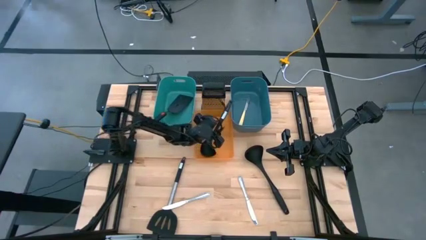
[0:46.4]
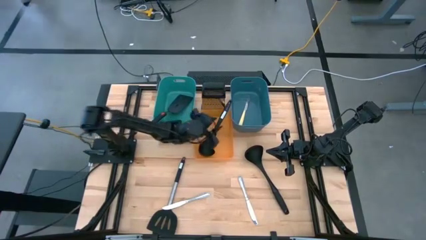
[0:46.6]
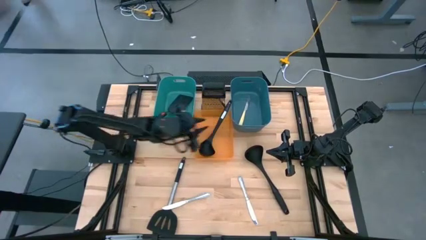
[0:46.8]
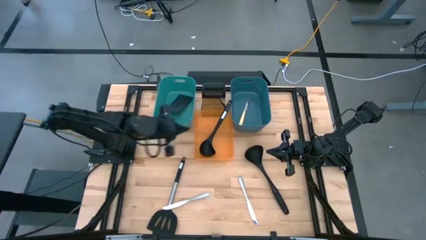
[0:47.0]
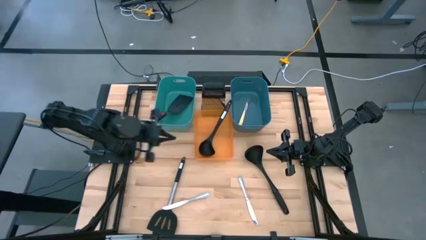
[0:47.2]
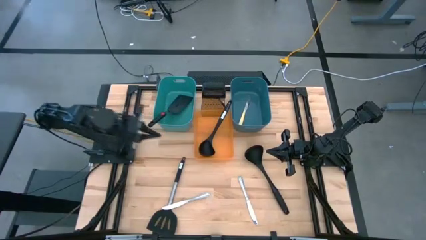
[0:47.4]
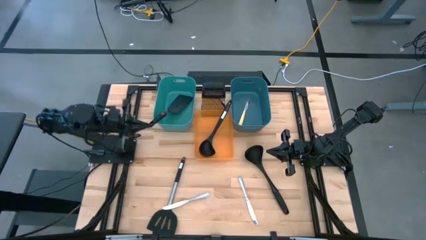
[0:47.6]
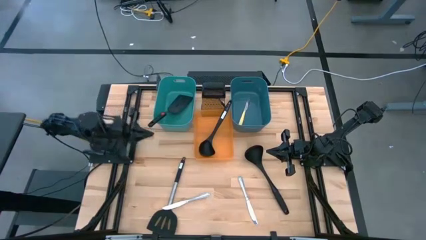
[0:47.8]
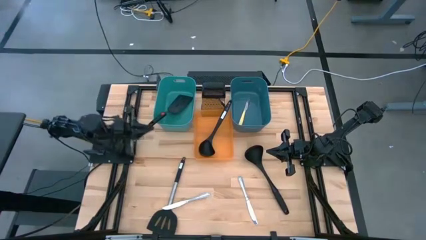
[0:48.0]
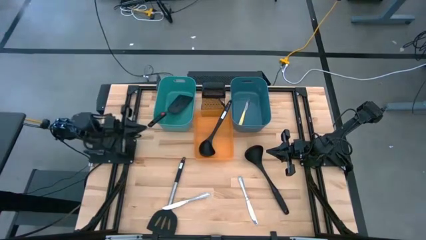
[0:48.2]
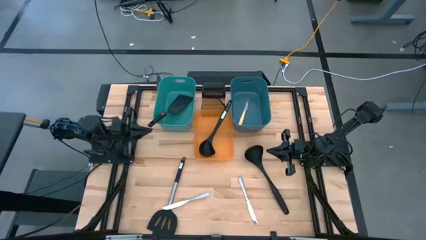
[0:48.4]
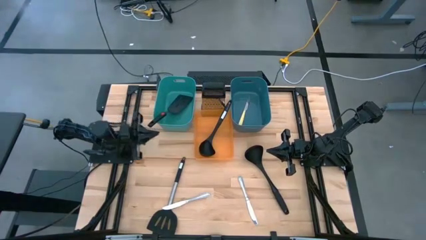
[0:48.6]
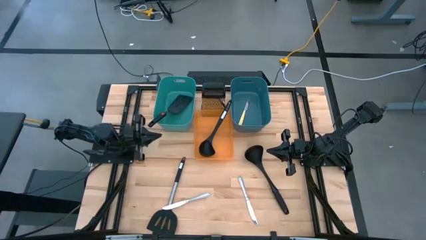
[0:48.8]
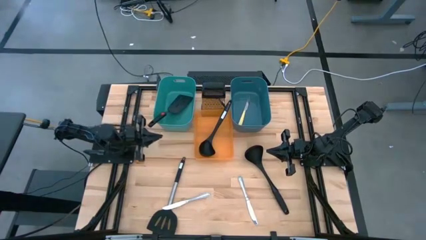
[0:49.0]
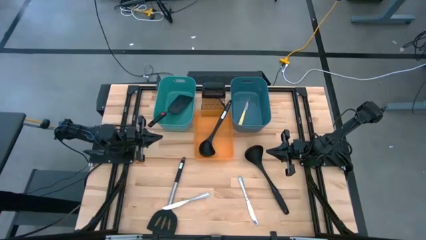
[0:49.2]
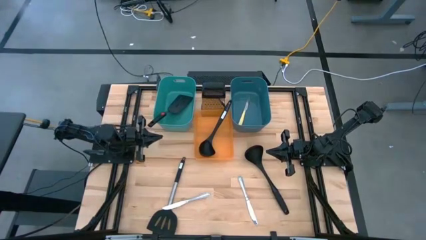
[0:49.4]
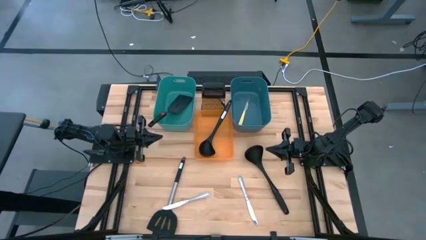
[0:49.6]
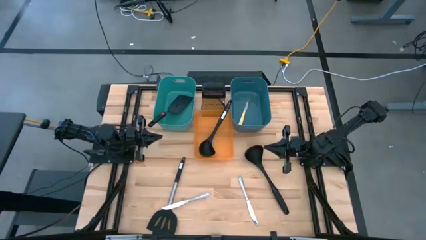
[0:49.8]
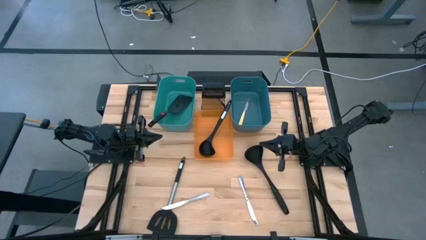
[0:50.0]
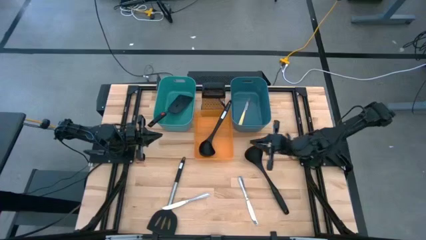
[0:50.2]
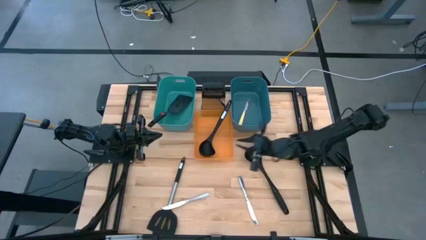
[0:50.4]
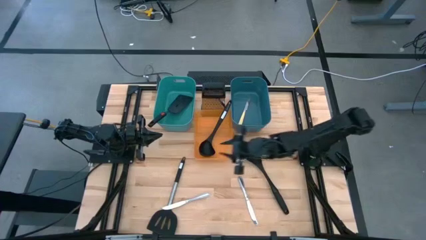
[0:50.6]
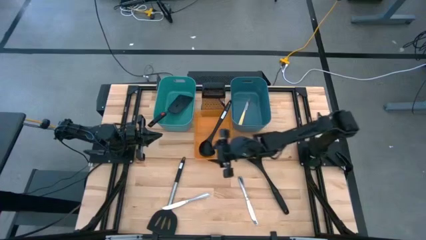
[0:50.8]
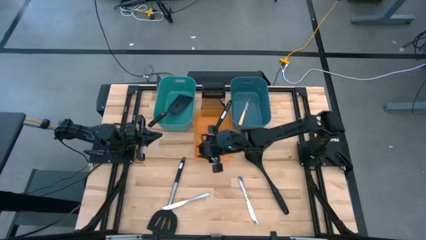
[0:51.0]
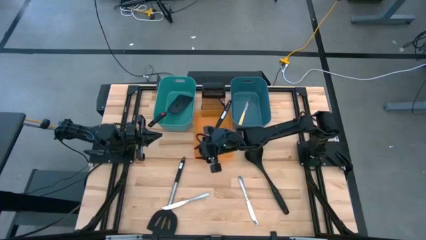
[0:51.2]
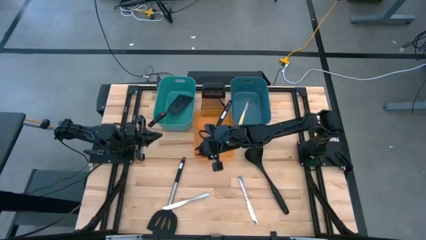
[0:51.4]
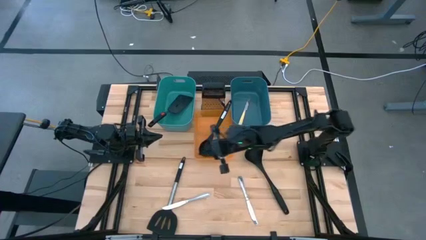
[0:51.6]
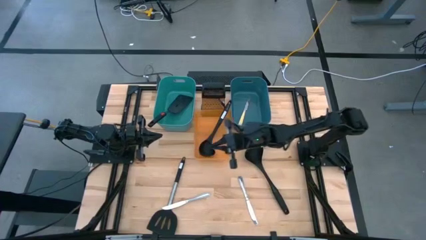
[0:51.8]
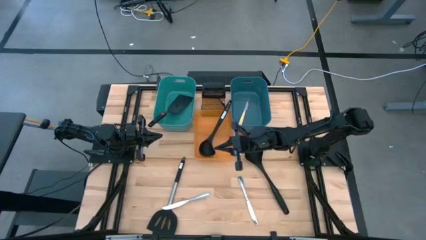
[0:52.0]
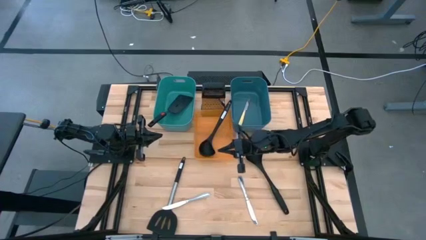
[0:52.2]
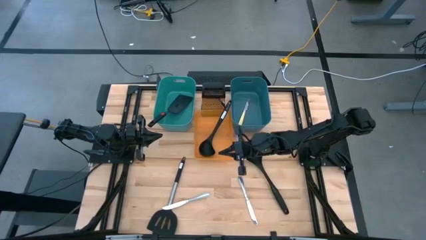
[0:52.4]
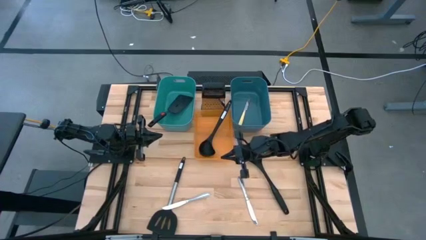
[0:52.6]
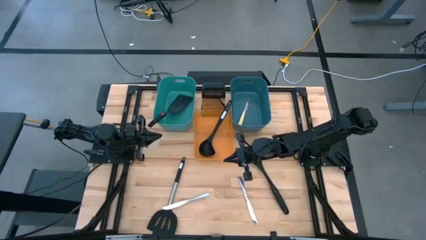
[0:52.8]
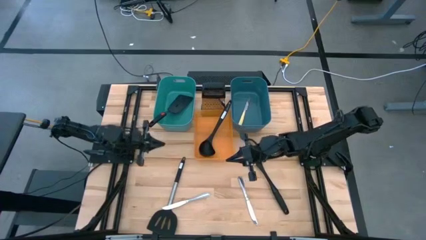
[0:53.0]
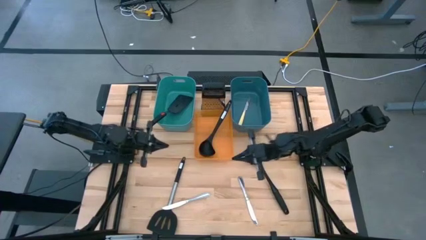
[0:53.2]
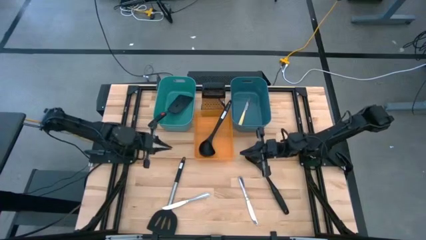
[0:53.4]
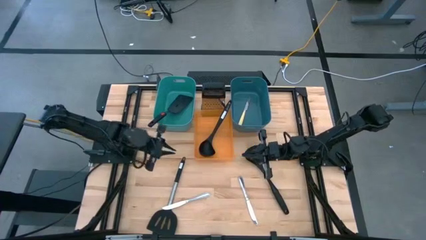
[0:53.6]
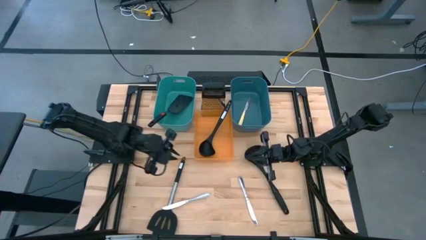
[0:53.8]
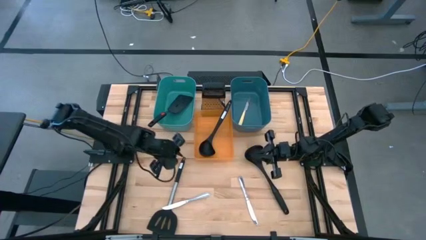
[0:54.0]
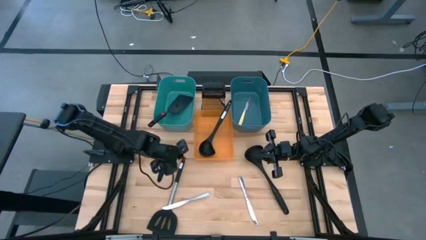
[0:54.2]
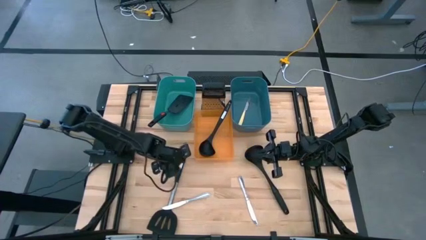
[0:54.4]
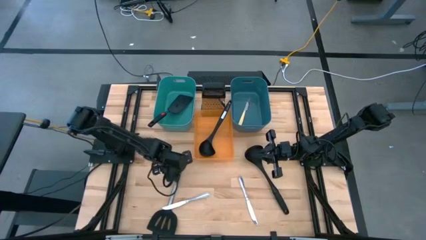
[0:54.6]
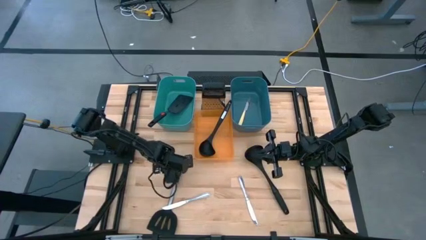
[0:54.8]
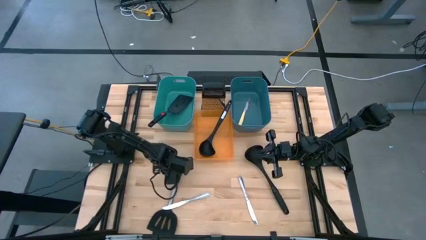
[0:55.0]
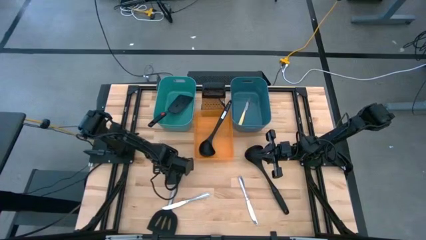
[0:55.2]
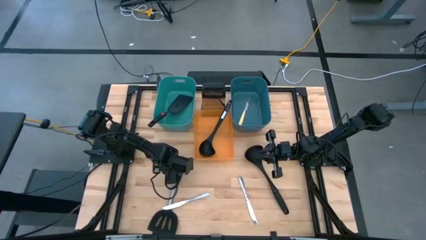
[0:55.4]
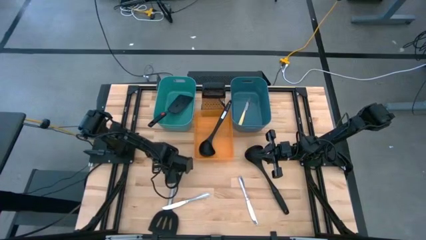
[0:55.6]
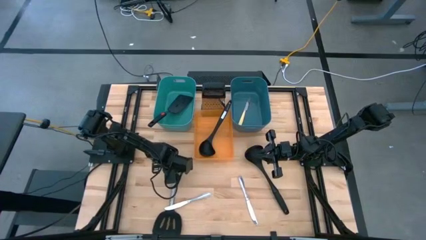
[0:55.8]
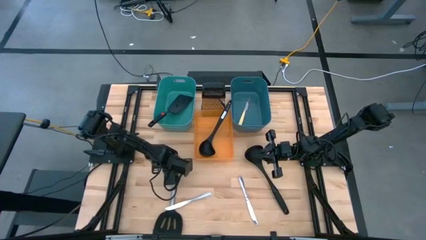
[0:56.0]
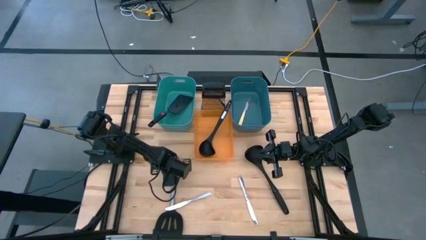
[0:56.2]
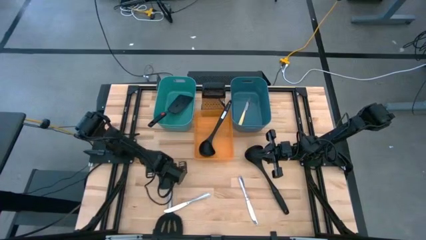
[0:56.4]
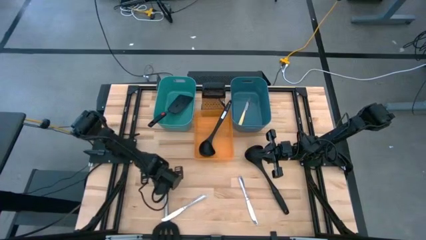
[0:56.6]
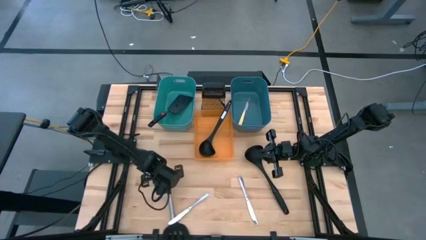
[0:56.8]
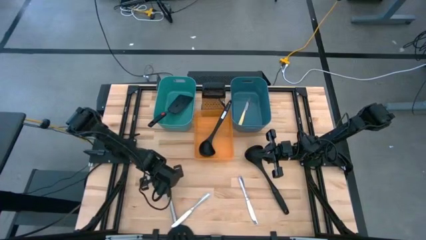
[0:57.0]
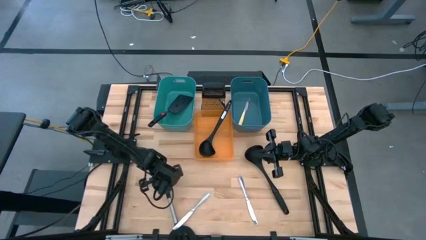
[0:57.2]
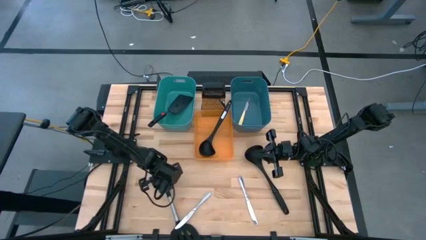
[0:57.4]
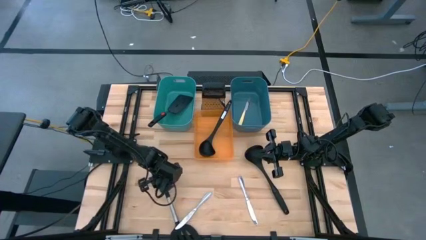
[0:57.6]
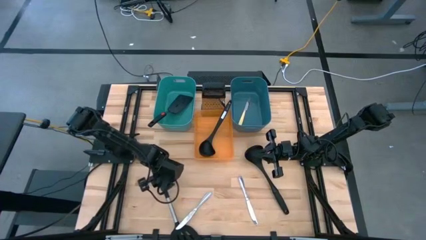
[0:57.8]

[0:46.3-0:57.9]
Task: Pick & Place Kitchen Items
Put the black spatula into the green bin

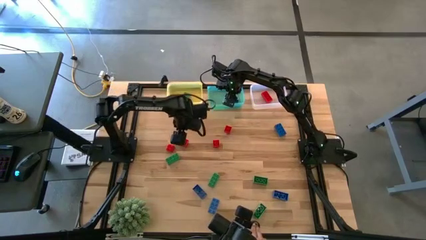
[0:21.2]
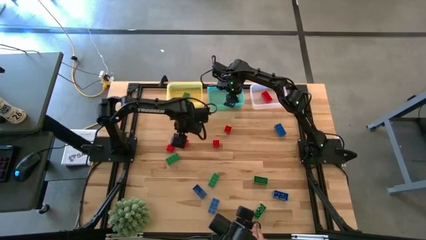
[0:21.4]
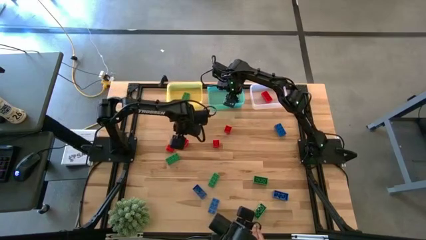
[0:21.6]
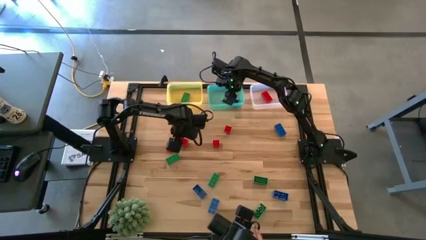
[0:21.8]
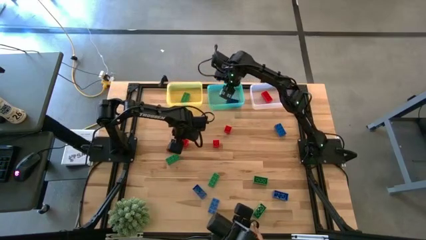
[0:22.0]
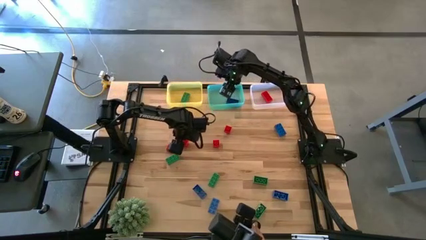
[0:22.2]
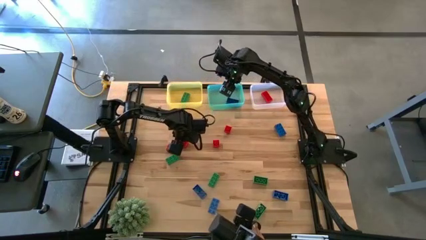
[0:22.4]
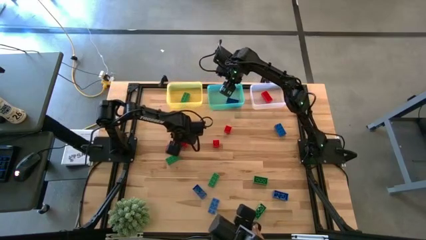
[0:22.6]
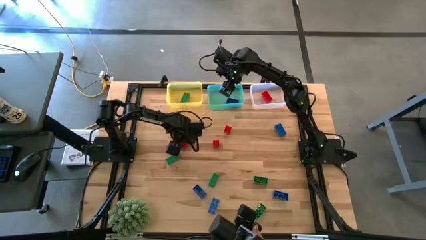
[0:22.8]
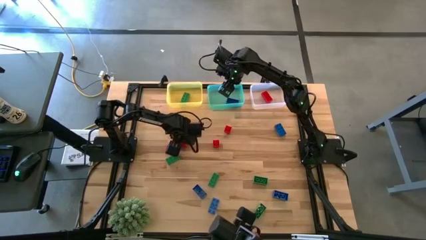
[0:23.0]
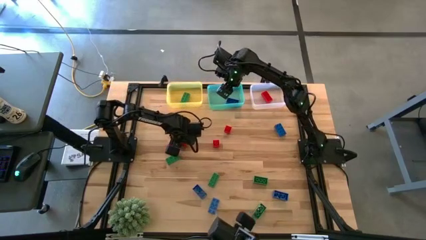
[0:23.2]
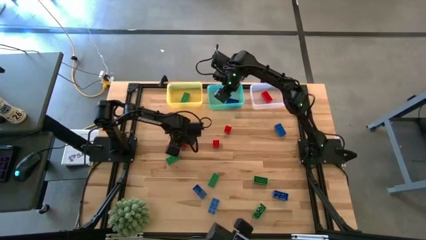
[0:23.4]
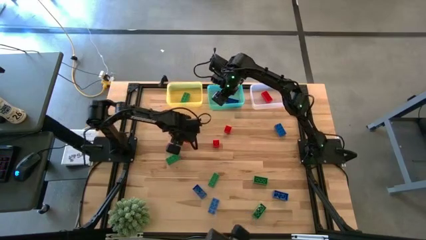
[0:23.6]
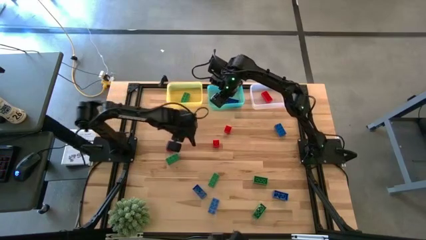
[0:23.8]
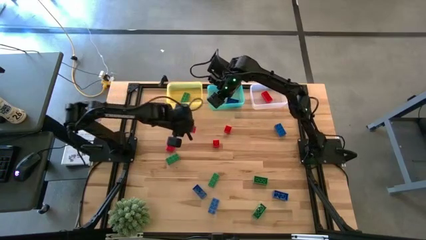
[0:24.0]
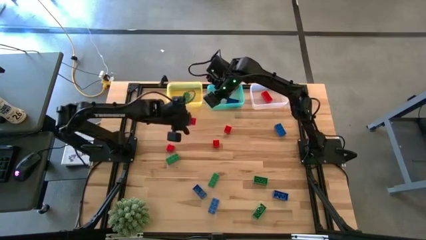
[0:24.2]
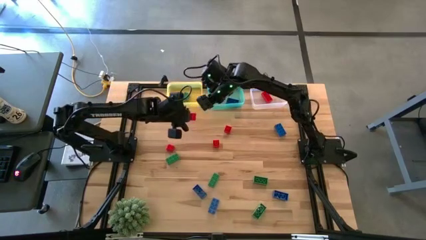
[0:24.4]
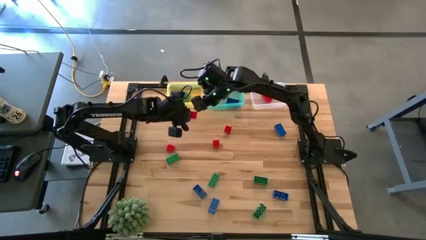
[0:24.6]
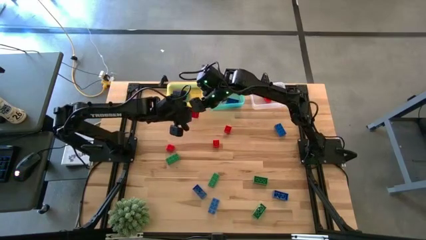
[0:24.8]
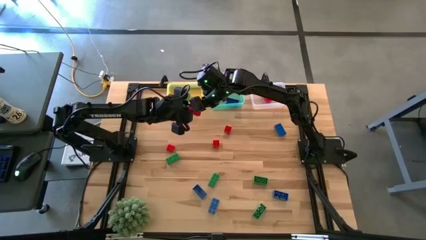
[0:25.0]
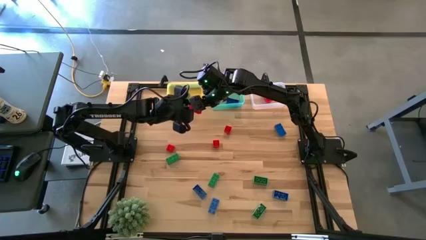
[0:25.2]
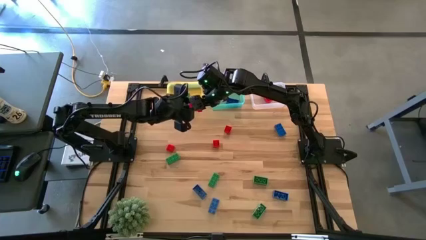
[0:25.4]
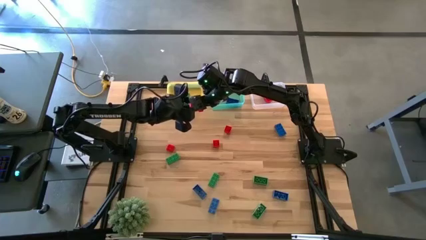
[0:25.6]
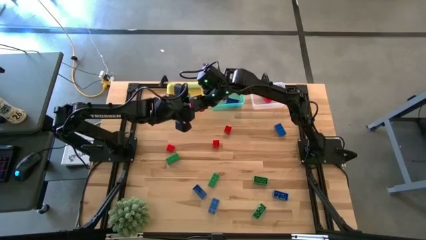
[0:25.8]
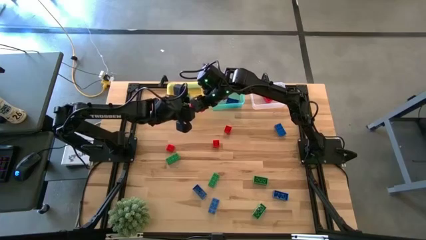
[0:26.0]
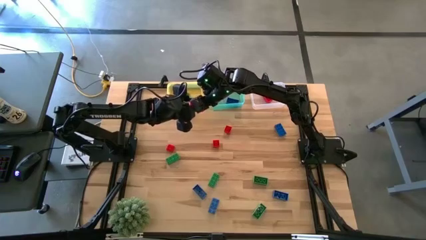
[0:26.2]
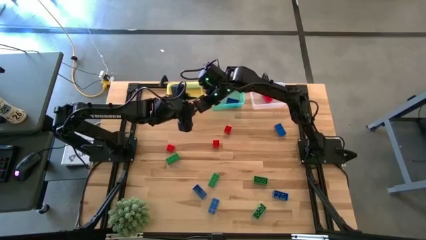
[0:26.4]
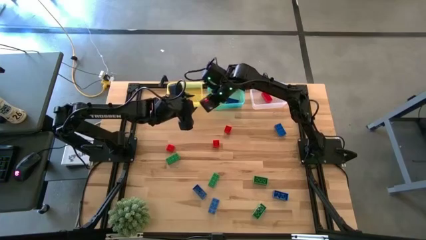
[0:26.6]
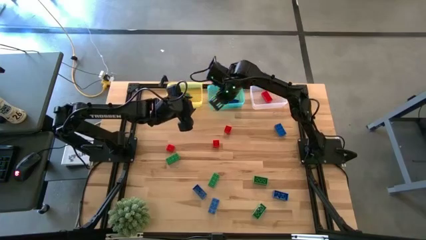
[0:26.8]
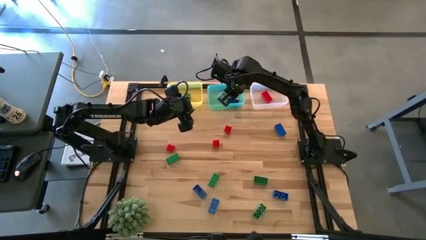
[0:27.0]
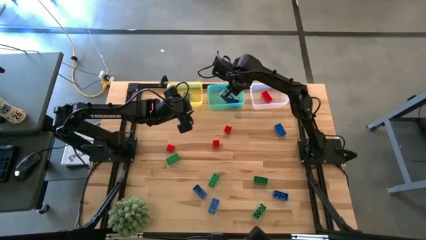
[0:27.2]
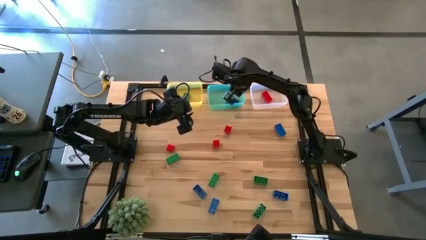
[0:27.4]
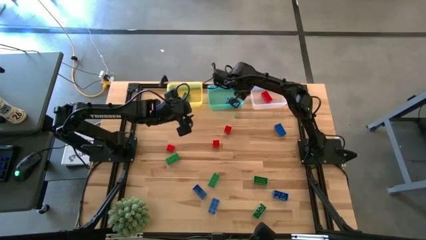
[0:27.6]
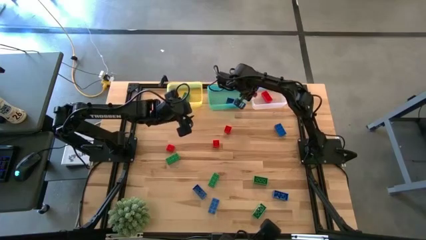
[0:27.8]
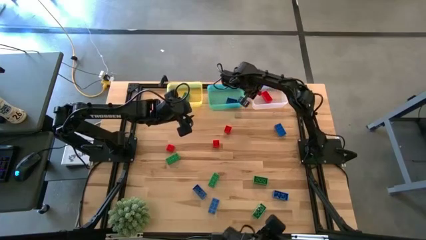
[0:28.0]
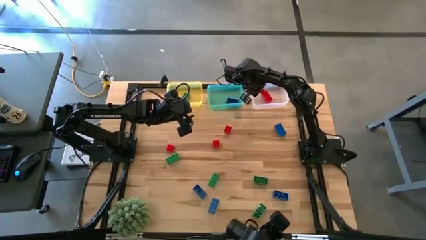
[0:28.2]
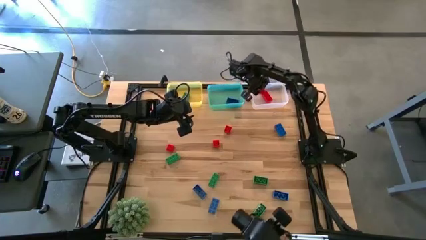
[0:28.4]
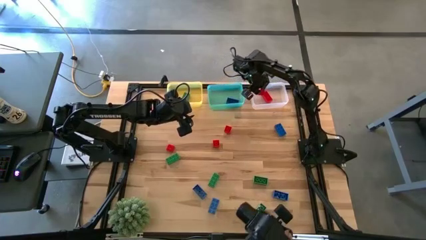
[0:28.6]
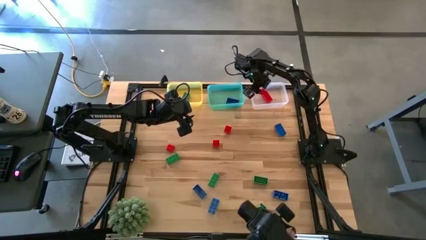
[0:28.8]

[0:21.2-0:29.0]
Task: Sort & place blocks by color
Put the red game piece into the white bin
